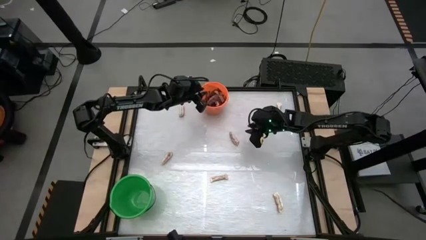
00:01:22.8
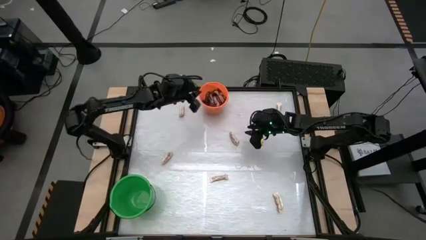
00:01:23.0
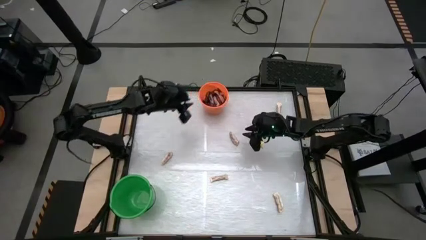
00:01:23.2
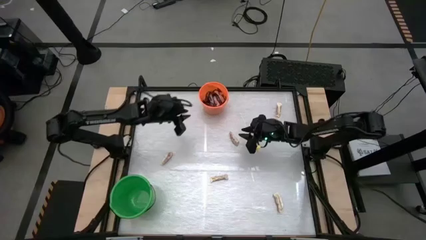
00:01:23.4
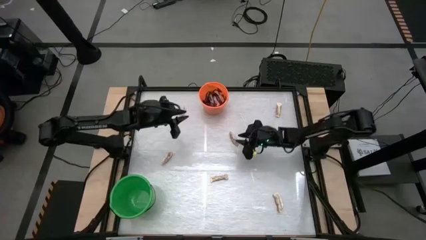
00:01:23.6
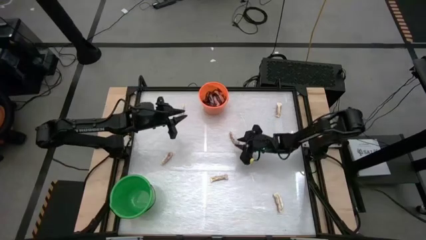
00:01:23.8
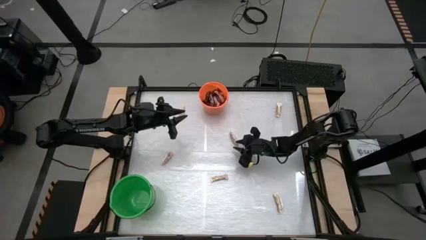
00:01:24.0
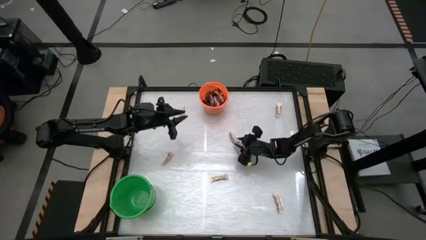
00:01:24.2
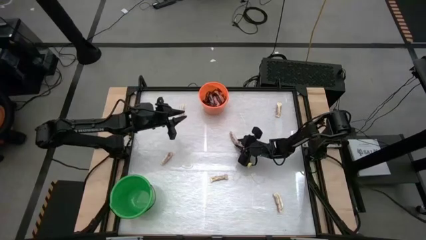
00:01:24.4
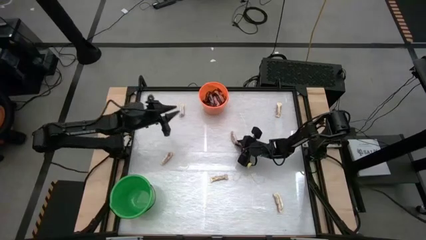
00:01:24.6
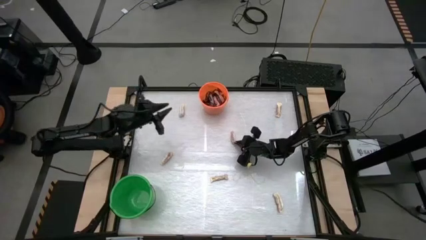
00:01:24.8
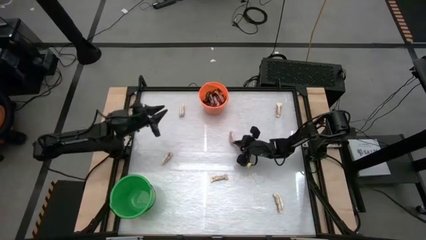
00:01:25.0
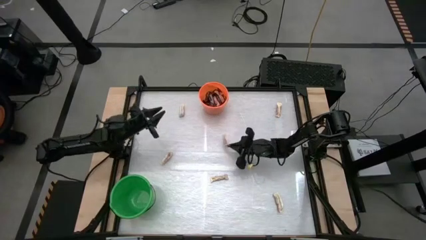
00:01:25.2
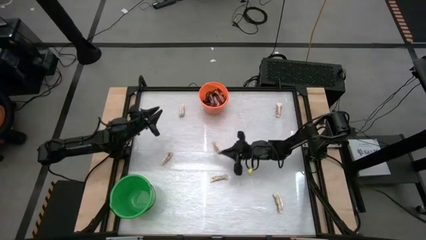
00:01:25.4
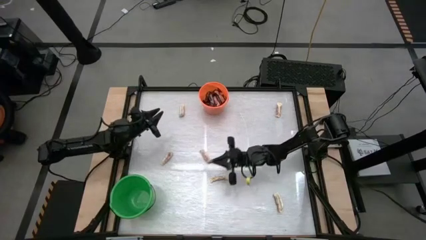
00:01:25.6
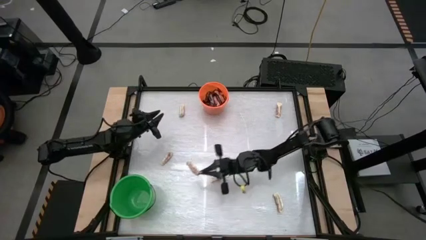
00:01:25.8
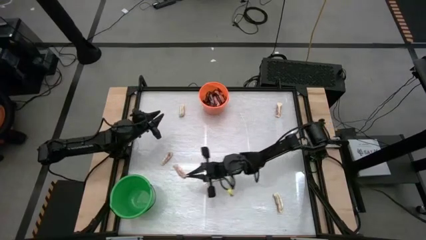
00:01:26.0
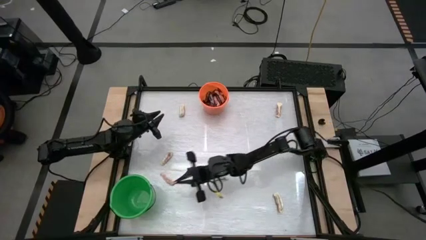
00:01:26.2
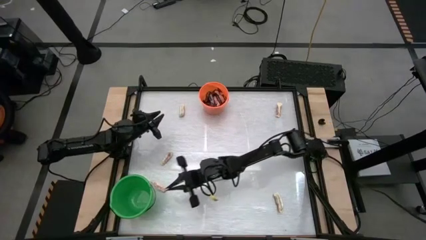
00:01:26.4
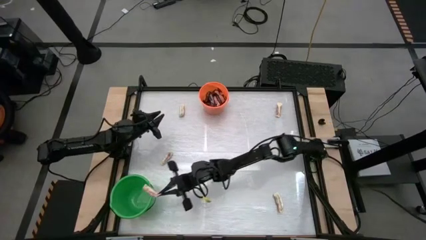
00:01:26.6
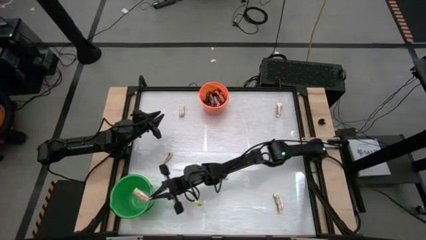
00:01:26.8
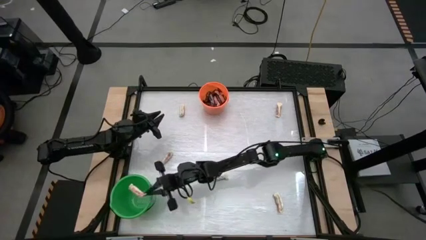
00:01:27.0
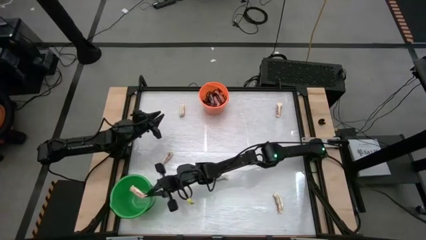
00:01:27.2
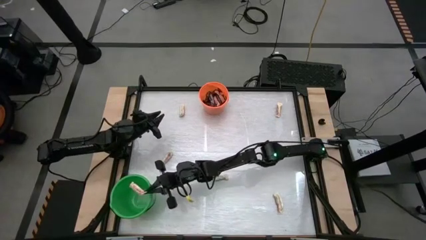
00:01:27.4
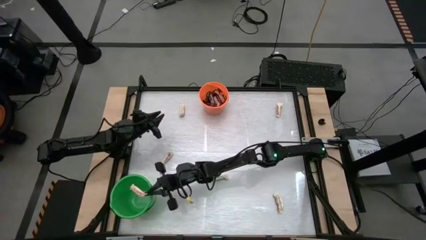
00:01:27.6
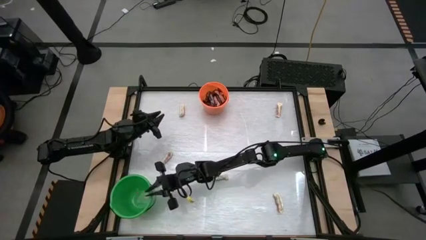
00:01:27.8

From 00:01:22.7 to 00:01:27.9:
Task: Sort candy by brand, put in halloween buckets
Put the white chocolate bar into the green bucket

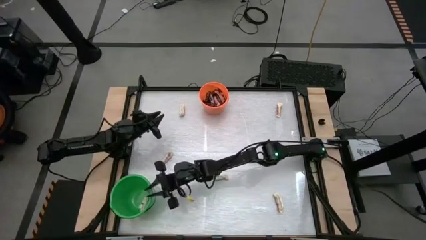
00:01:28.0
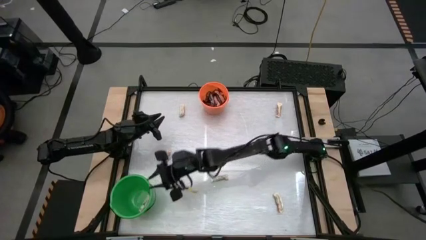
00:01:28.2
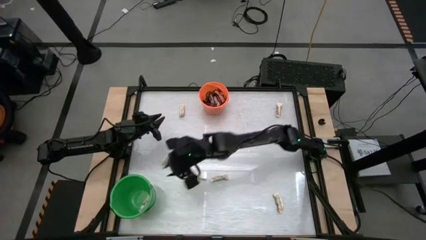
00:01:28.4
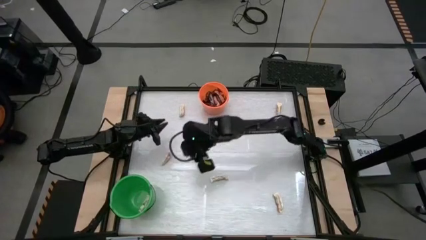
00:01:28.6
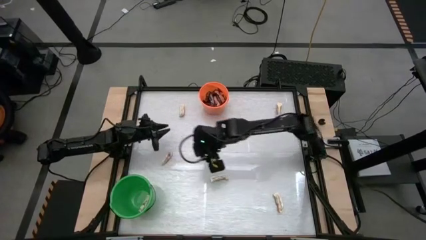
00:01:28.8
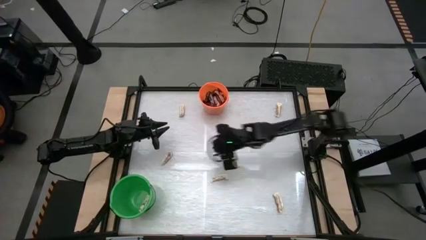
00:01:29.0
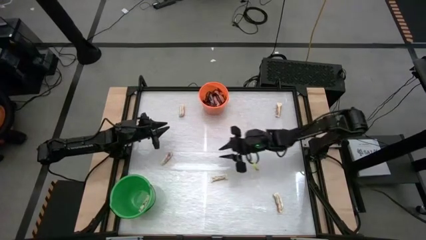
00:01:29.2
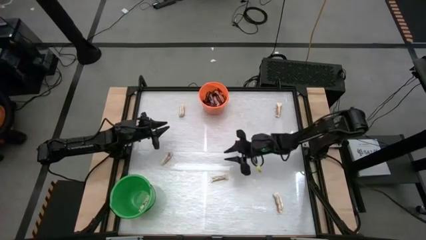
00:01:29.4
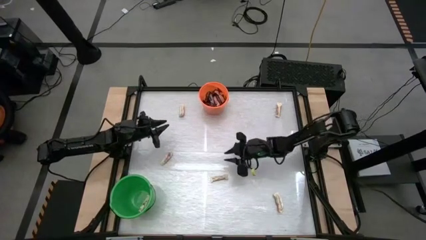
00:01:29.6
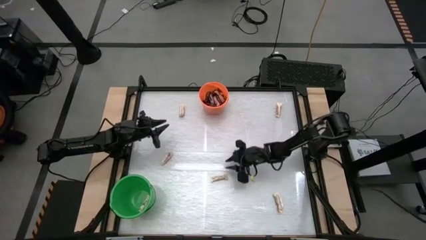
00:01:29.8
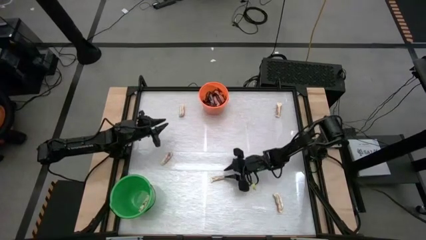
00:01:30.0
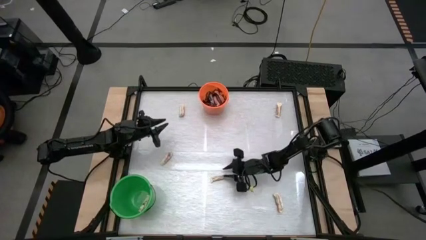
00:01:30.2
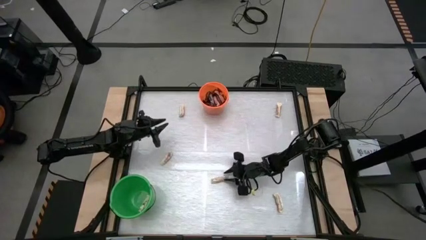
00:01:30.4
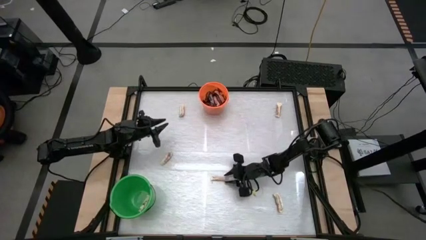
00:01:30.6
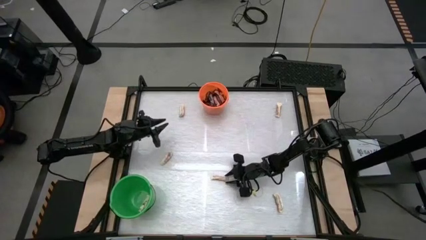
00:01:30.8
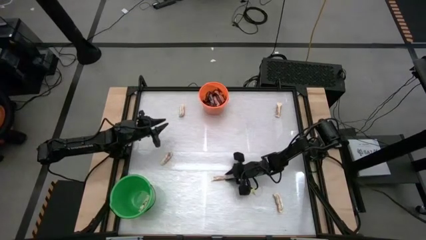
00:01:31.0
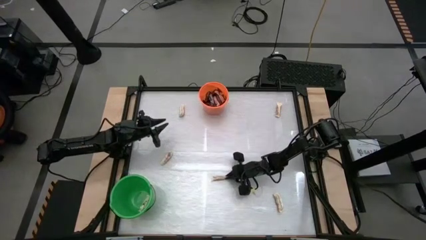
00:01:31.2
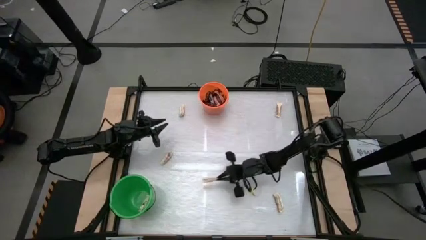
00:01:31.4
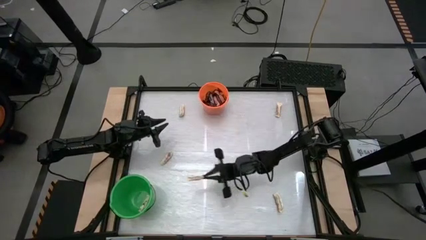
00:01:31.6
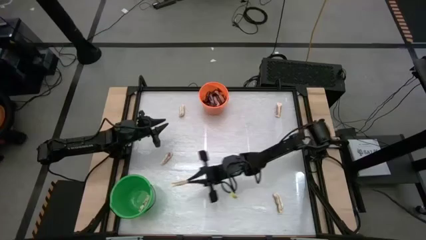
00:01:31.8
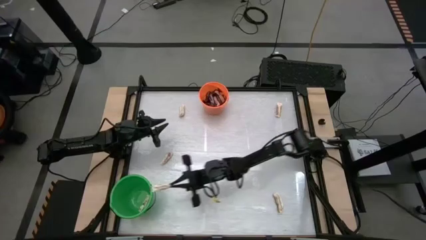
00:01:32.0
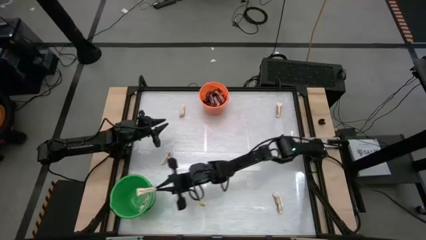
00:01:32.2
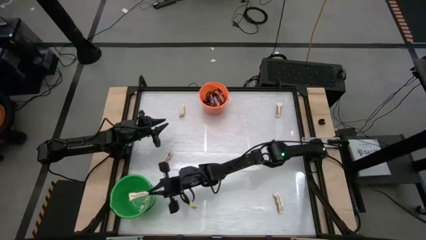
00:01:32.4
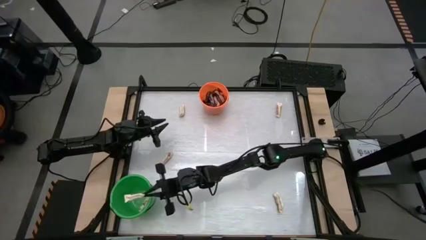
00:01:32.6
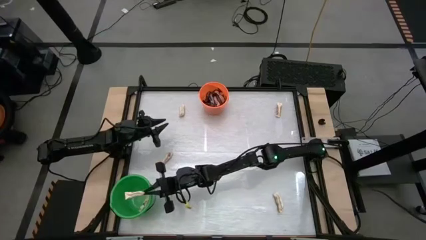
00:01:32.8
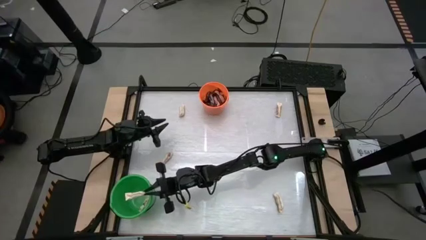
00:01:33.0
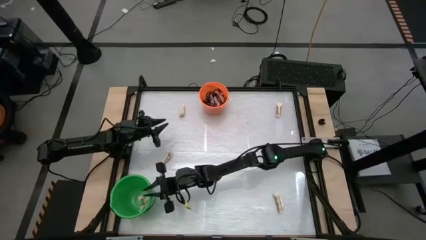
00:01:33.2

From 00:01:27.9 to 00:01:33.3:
Put the white chocolate bar into the green bucket

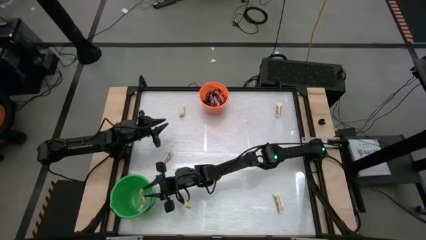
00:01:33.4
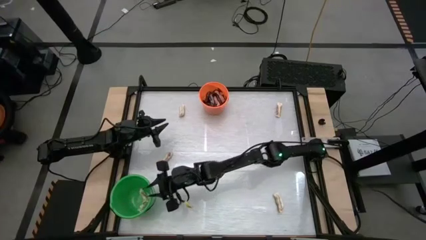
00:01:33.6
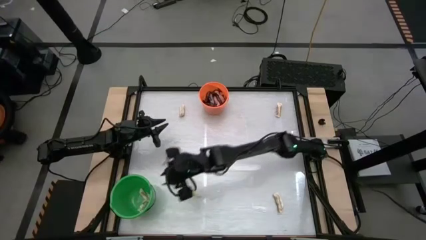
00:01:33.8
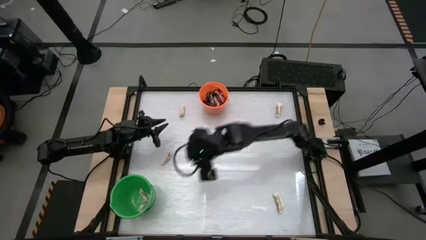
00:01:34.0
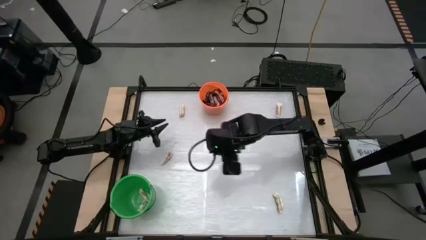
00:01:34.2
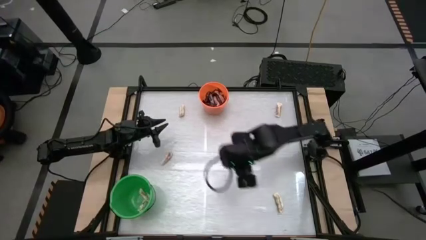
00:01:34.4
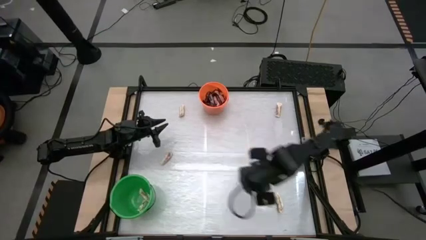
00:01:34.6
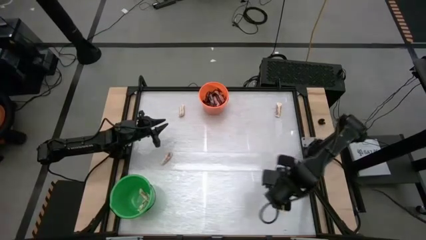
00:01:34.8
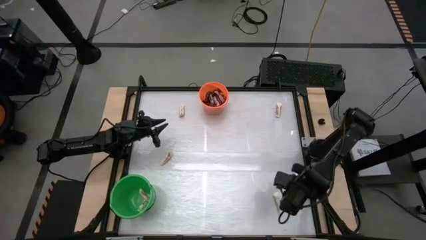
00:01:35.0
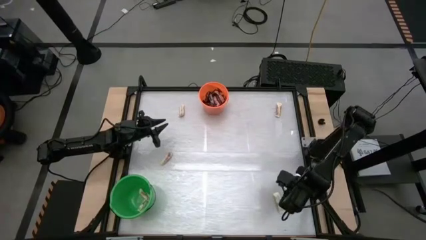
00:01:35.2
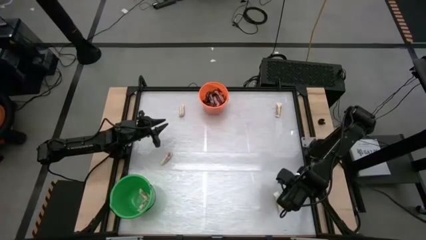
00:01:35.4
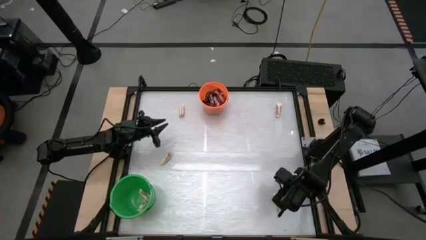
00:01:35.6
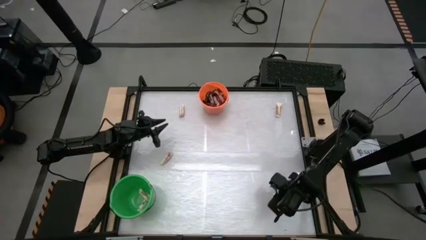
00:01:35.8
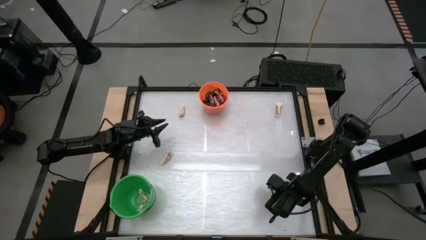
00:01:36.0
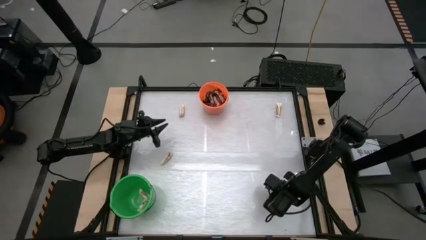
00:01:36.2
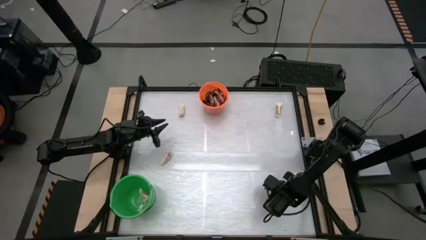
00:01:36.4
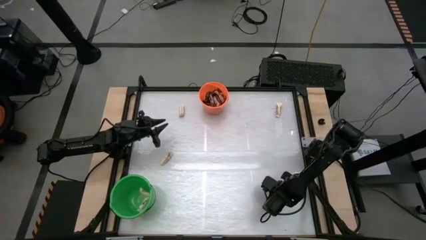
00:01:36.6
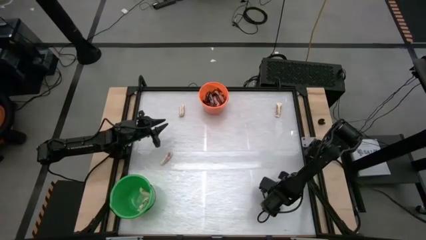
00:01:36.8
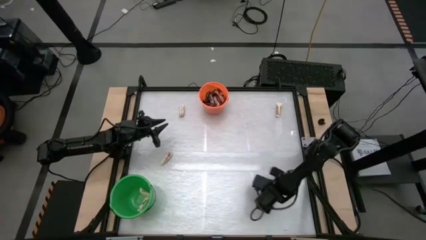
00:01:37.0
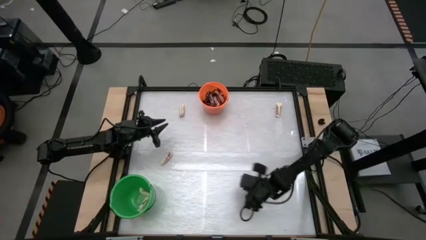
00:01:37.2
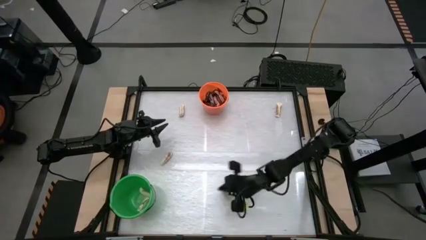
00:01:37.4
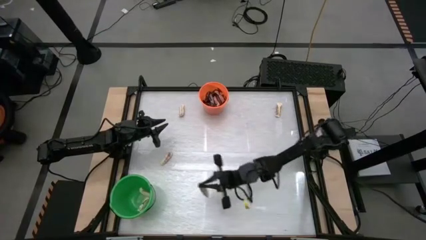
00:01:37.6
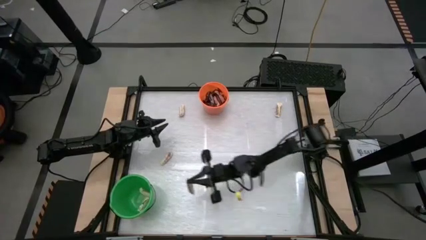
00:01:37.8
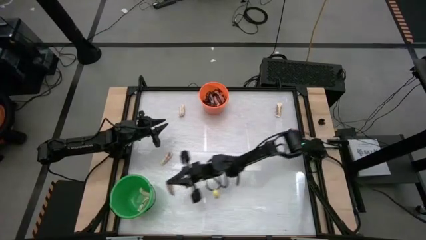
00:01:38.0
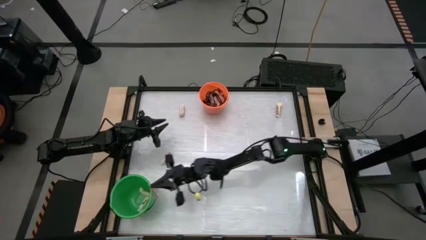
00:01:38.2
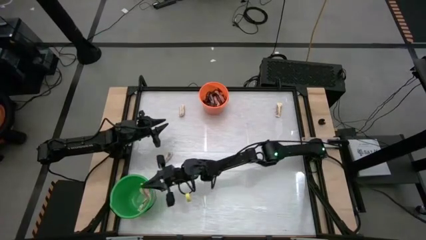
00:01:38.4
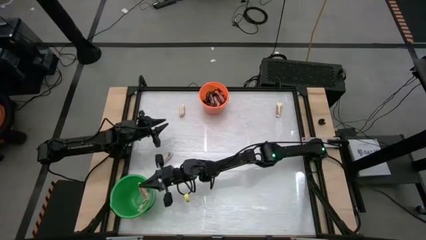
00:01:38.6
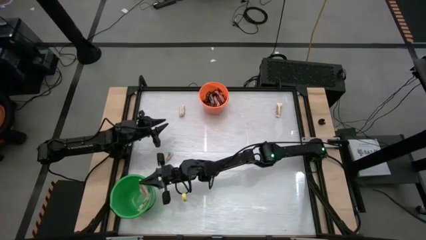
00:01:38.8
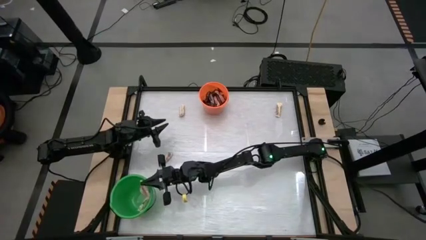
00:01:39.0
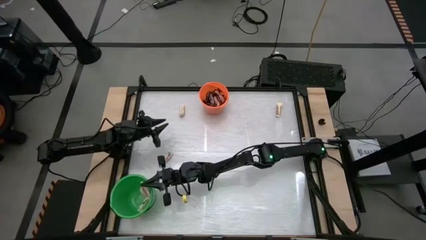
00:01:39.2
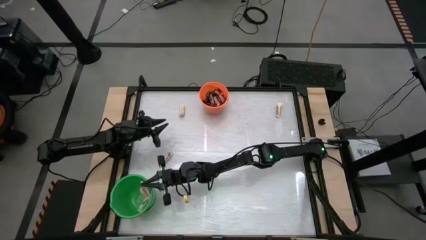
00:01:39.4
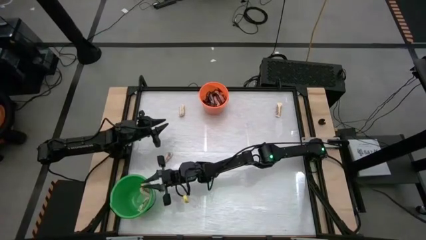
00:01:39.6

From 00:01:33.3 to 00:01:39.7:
Put the white chocolate bar into the green bucket
